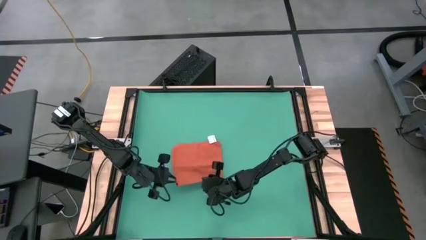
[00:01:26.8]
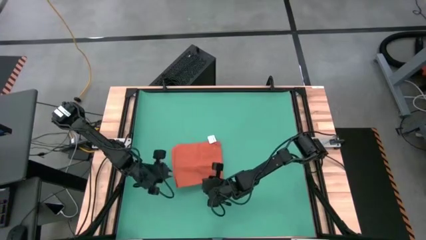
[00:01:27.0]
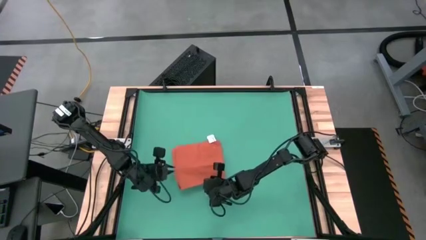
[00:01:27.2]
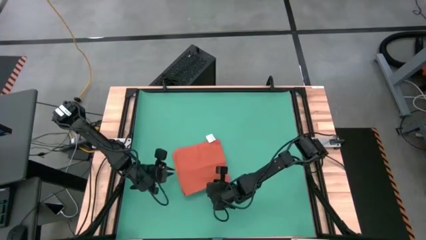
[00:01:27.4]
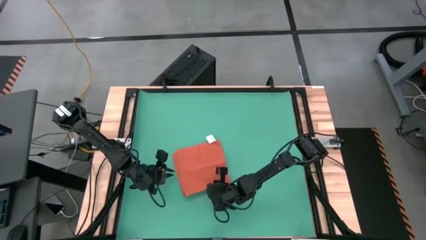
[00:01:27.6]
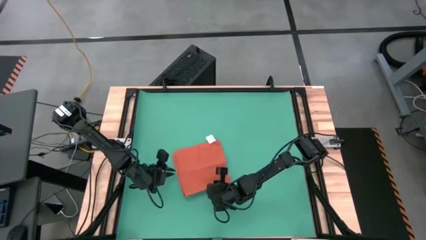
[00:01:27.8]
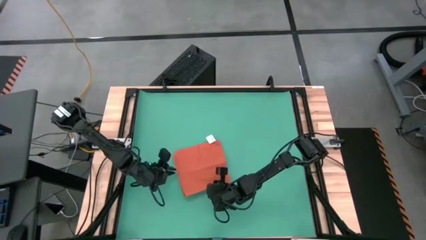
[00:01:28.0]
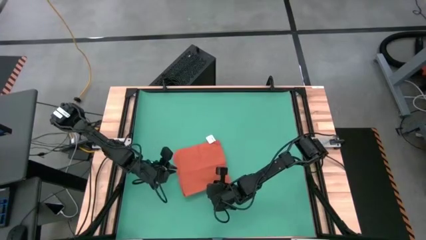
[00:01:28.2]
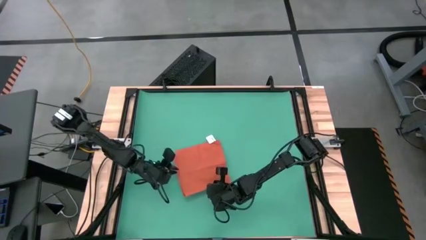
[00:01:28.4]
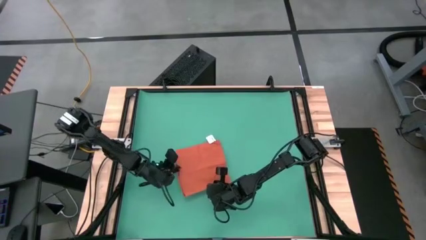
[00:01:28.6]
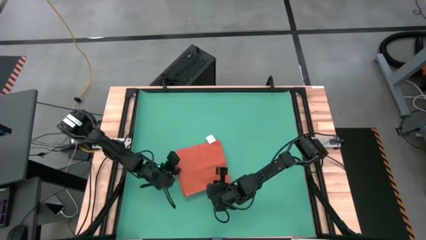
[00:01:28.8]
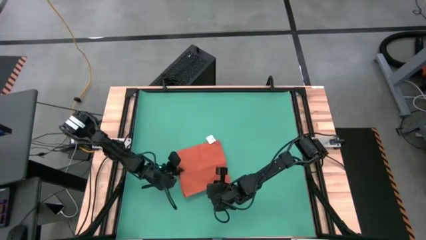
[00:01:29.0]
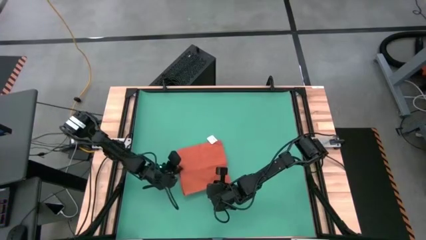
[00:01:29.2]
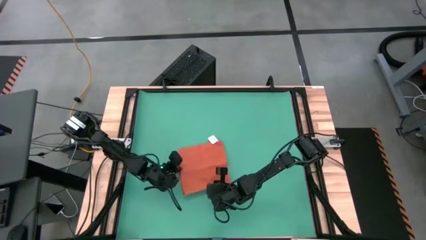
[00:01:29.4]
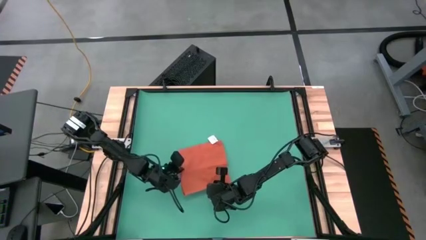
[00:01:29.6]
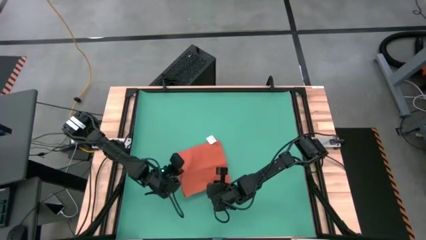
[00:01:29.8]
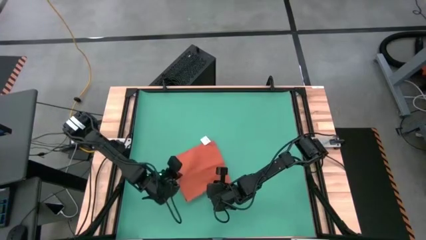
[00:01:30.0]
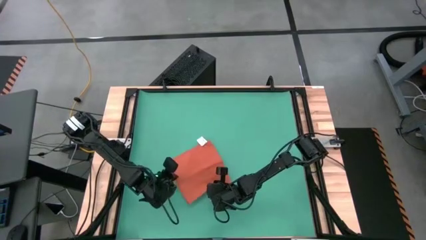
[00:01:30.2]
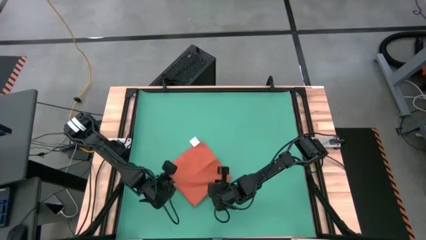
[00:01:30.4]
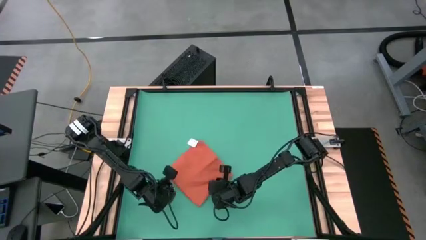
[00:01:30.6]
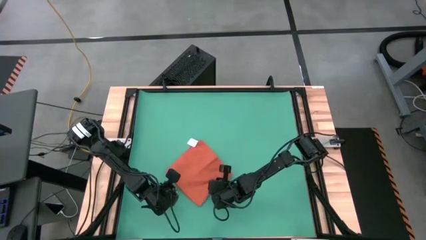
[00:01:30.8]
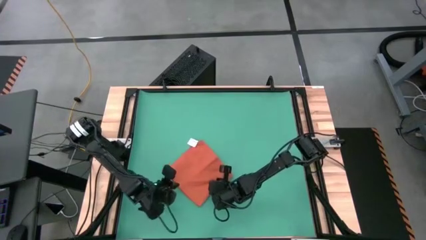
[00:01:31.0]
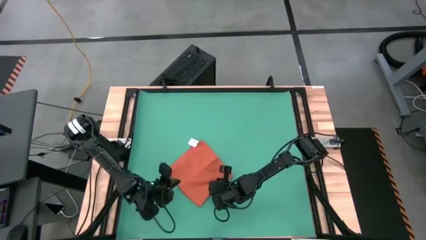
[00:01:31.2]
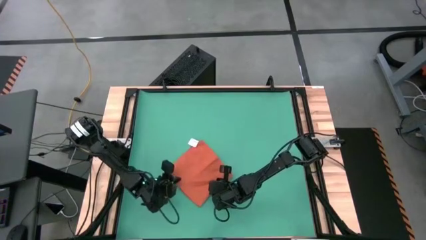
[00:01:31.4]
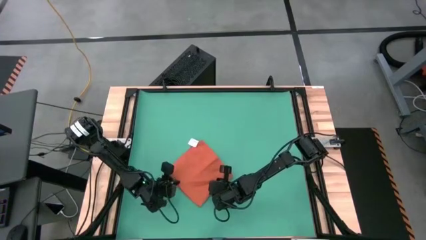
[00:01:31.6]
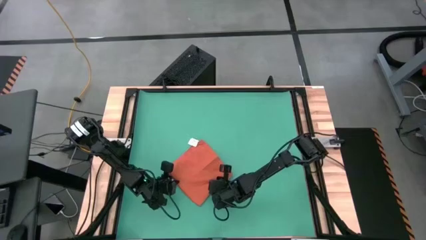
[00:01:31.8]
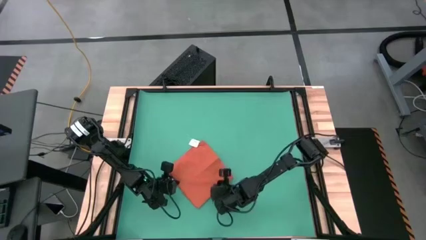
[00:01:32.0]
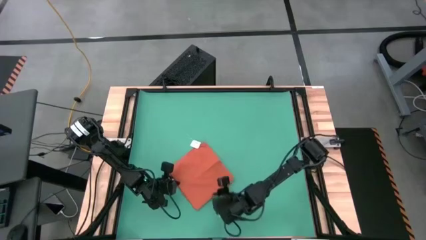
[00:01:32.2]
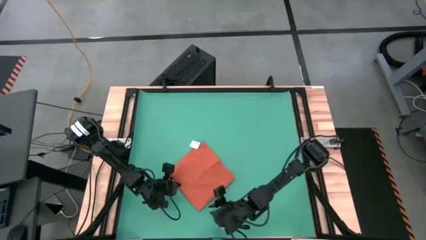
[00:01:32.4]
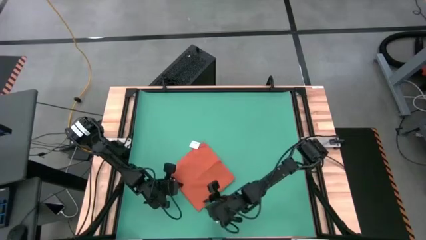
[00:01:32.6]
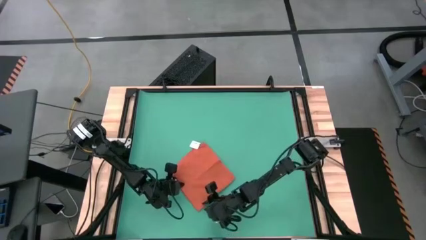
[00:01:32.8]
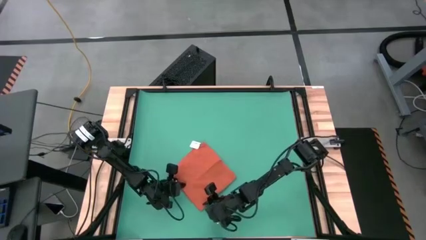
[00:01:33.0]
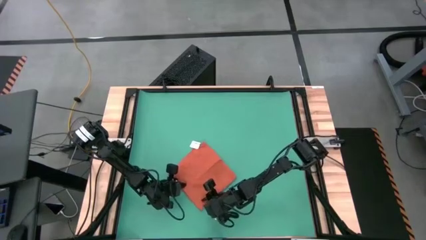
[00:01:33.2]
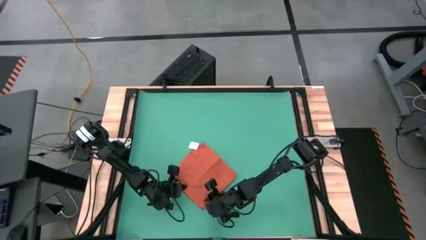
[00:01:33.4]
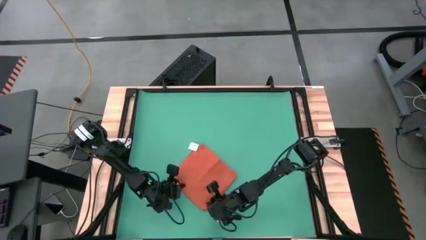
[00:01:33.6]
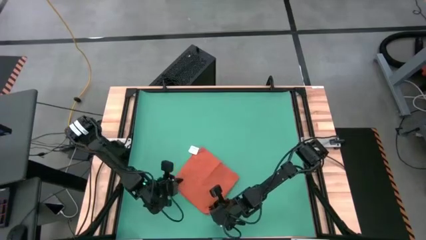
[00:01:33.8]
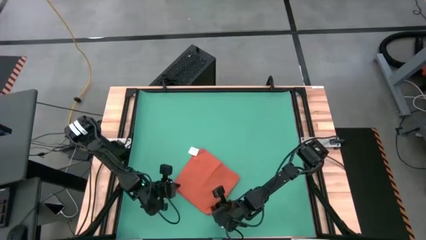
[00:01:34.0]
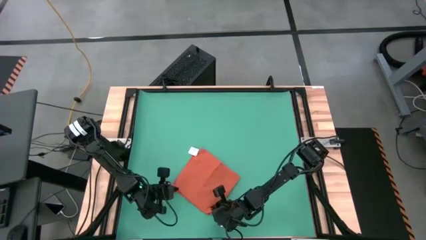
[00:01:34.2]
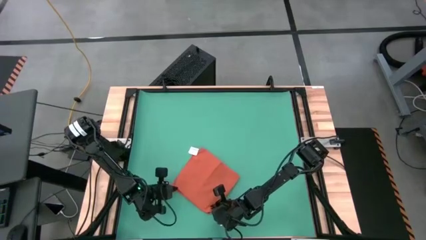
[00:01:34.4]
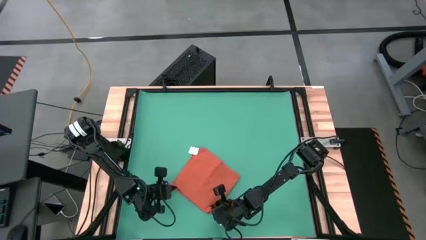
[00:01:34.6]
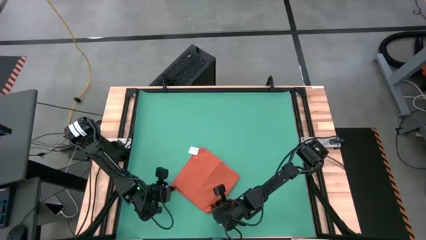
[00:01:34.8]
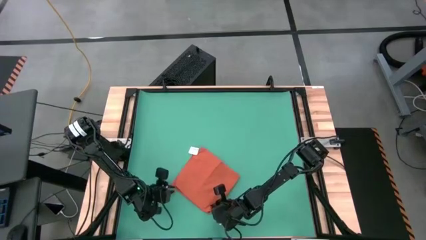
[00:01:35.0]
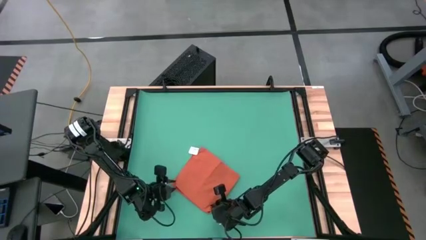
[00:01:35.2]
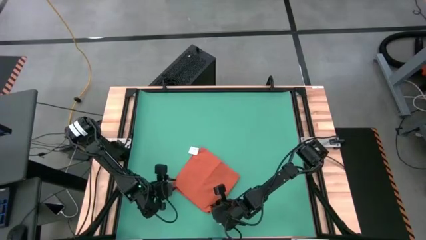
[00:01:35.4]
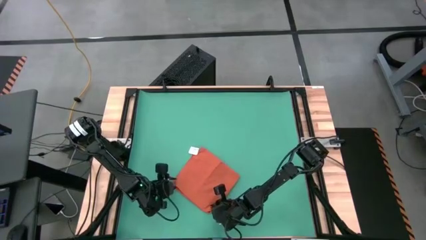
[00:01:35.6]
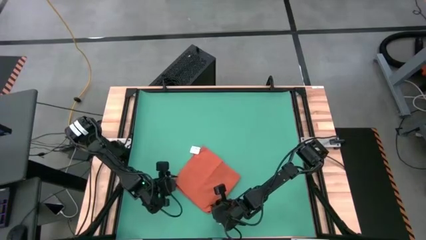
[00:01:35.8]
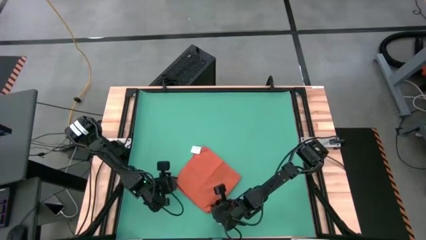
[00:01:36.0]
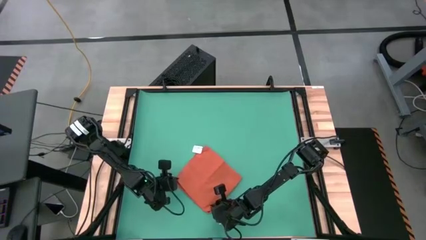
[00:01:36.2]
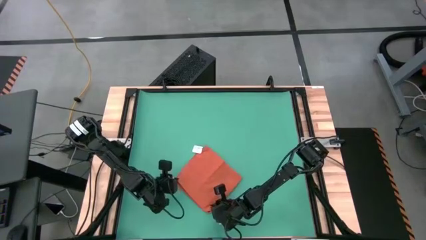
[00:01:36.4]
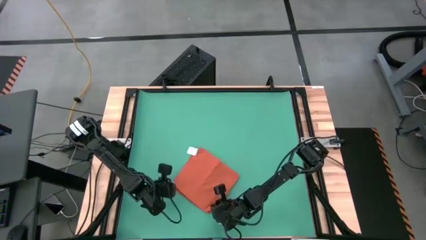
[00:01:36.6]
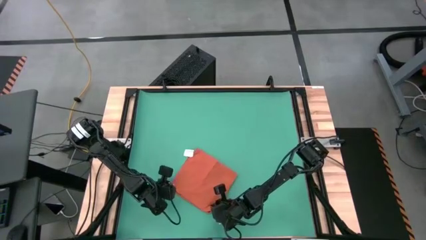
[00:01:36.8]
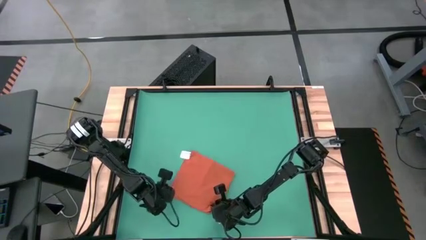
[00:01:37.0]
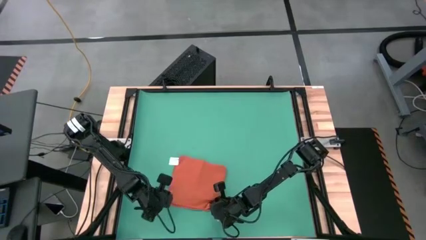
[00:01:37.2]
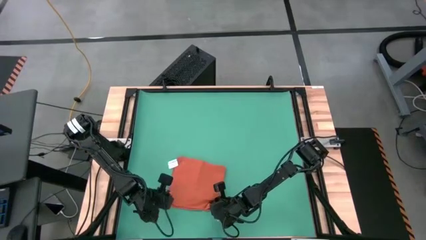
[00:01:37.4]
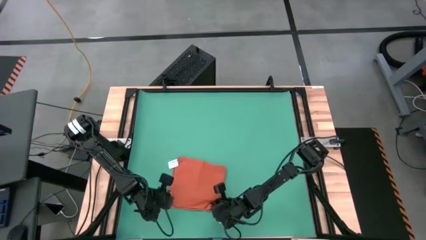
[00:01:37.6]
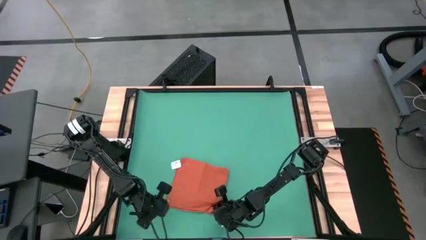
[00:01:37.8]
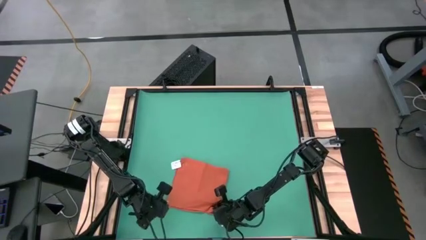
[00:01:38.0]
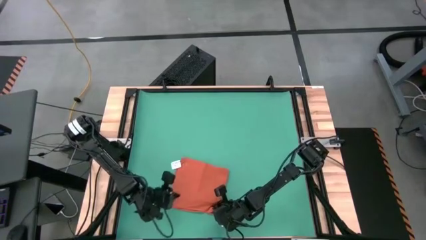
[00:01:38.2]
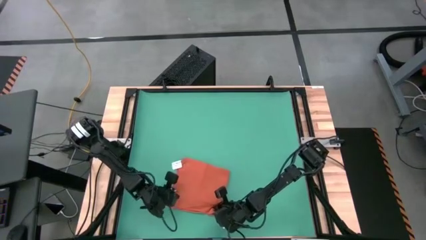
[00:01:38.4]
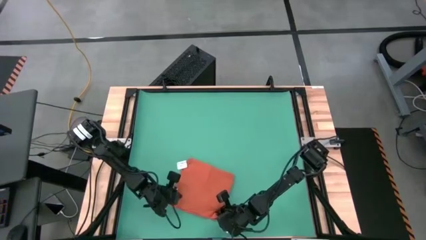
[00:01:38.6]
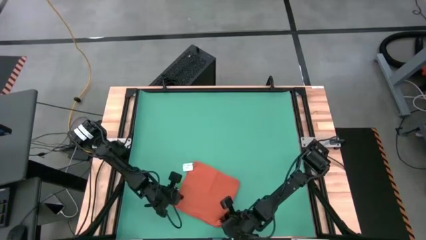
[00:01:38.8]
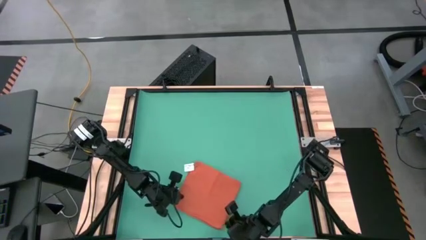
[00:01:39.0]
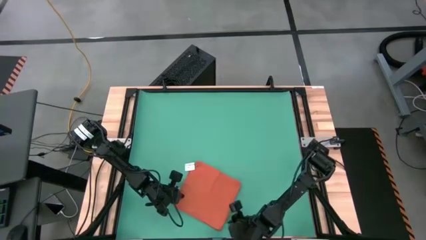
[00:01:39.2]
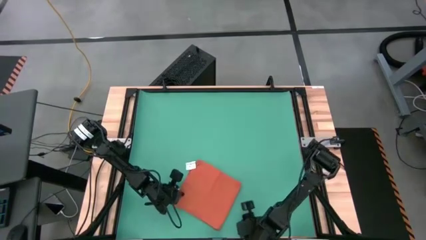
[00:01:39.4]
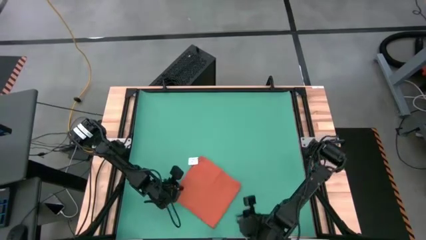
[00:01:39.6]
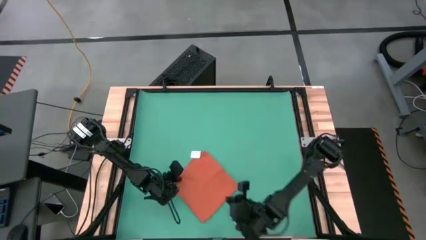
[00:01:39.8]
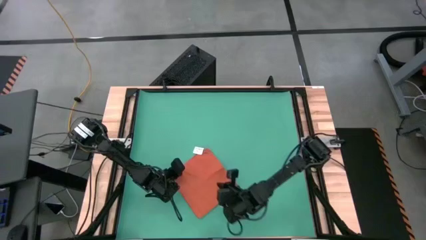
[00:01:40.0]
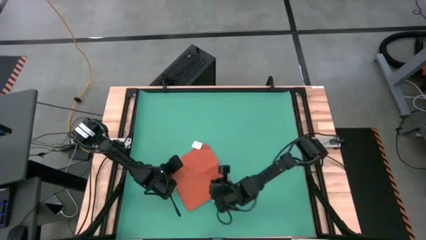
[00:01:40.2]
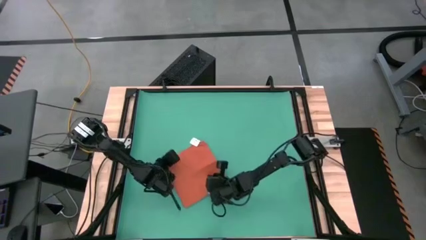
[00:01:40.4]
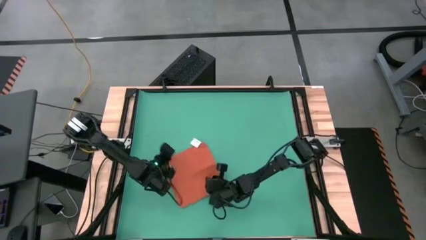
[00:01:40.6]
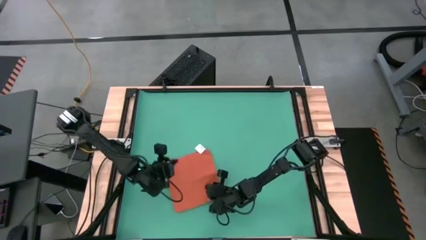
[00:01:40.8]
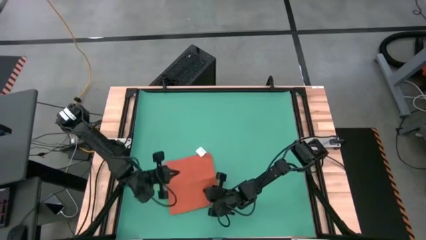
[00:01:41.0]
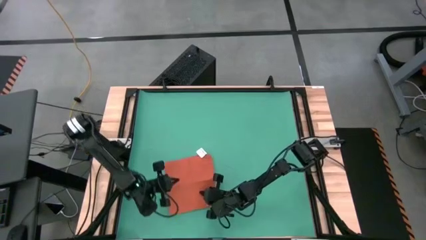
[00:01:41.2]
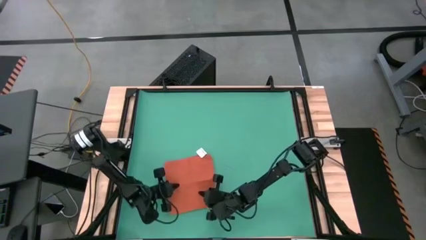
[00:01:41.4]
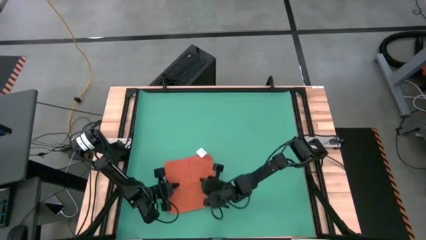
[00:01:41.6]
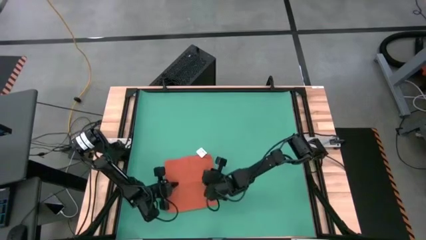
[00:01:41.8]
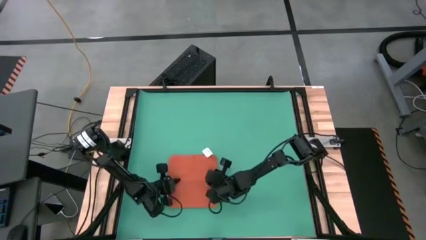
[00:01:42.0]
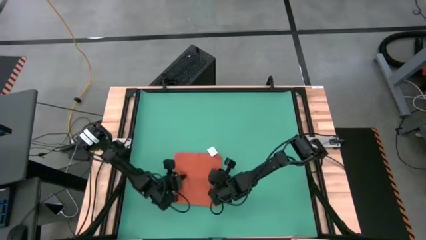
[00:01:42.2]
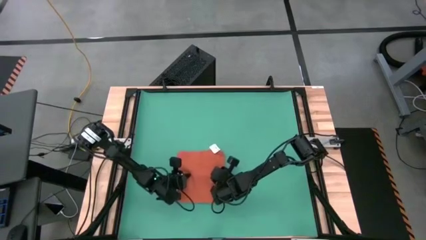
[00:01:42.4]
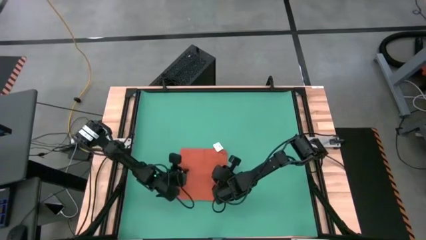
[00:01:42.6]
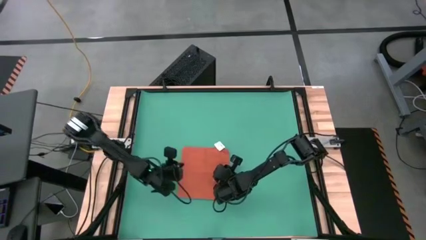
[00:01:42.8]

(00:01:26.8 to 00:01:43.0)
Task: Roll napkin
Fold the orange table napkin
